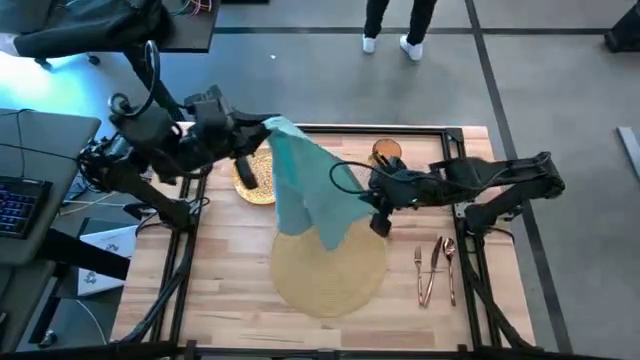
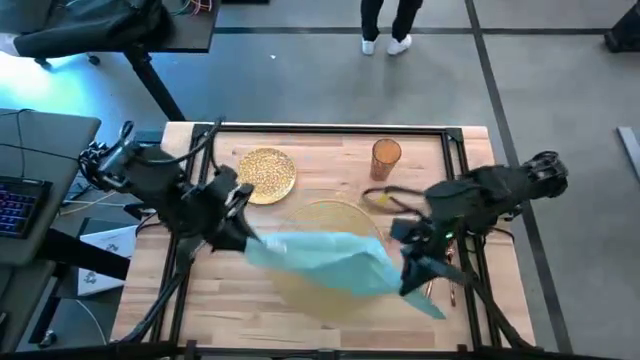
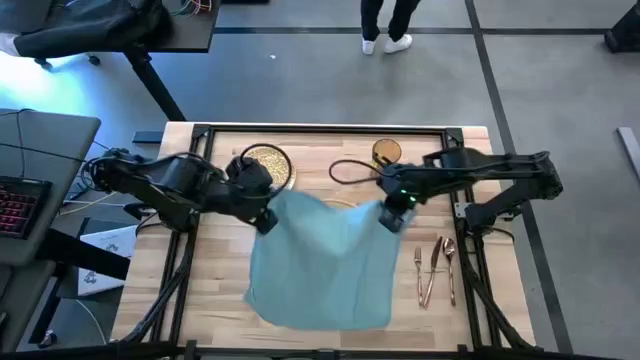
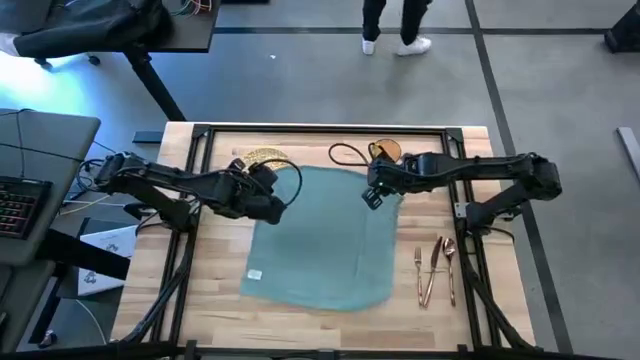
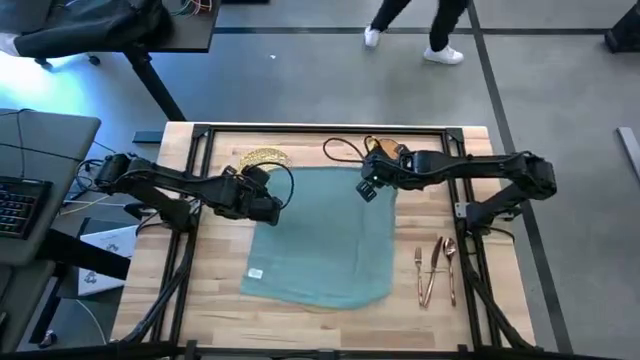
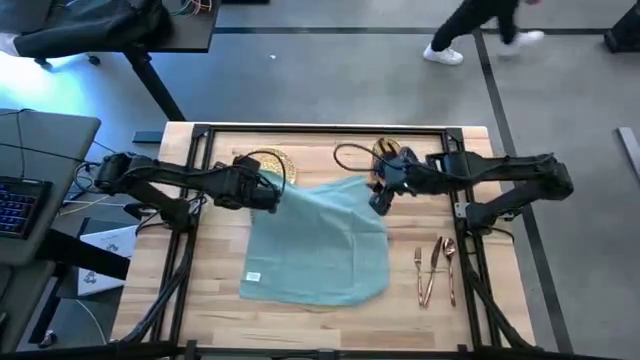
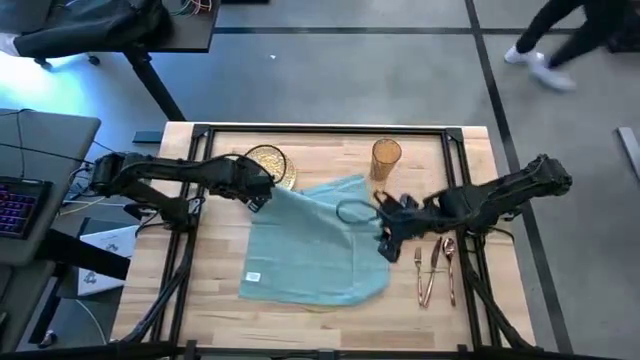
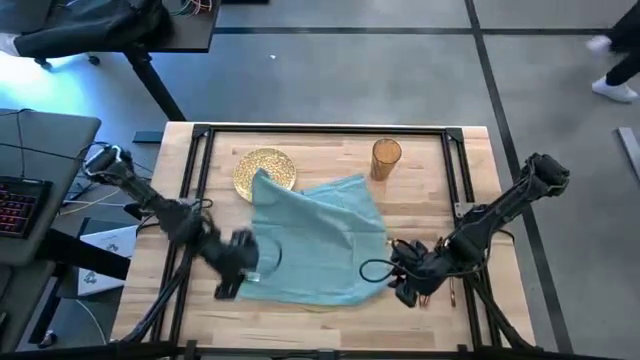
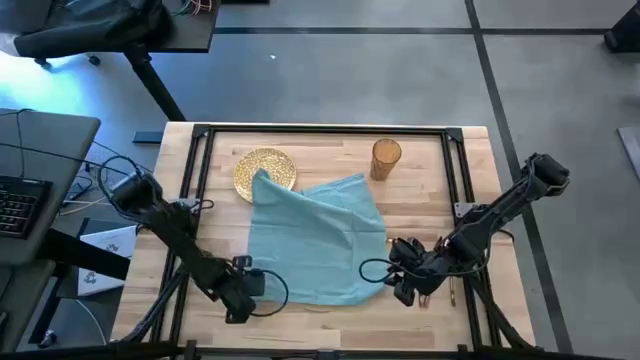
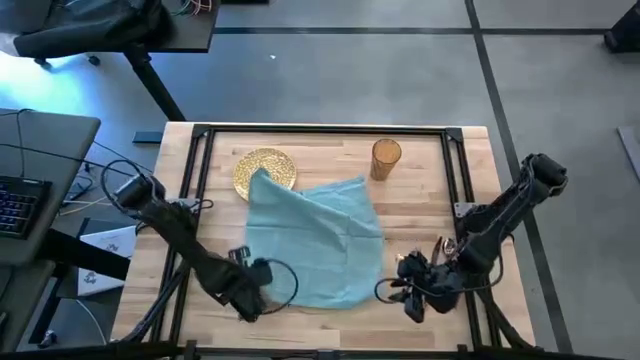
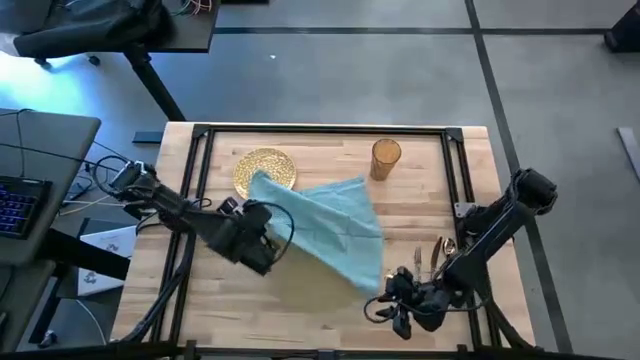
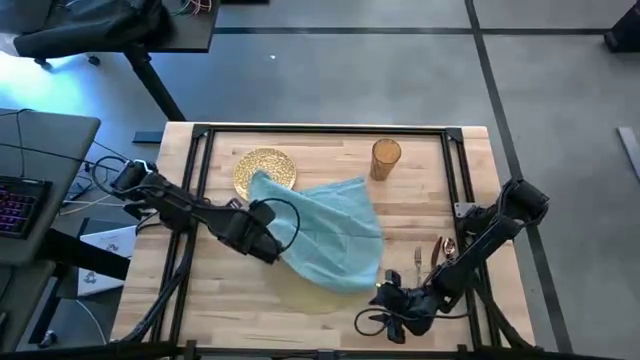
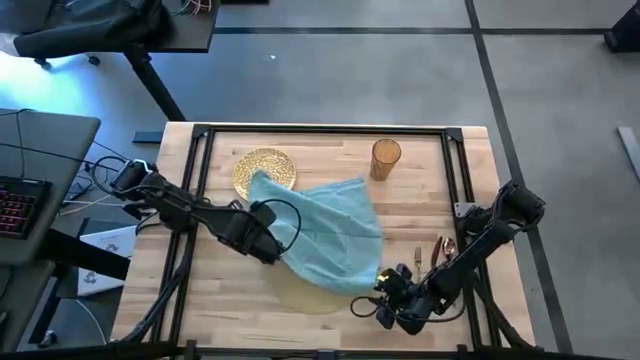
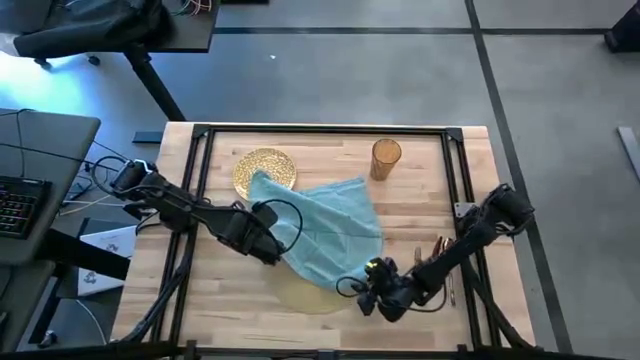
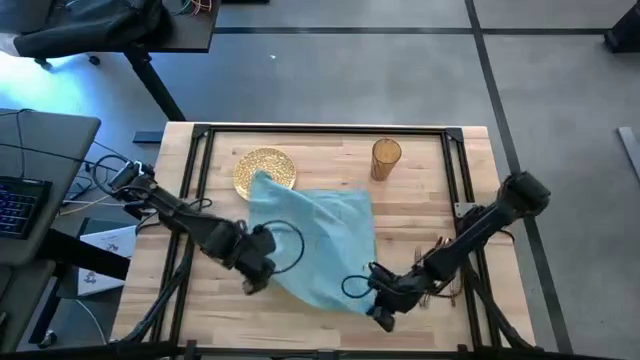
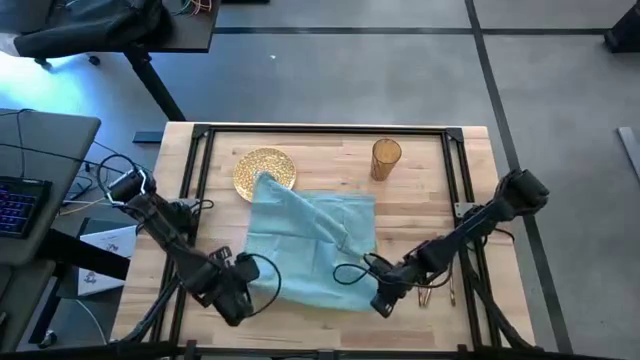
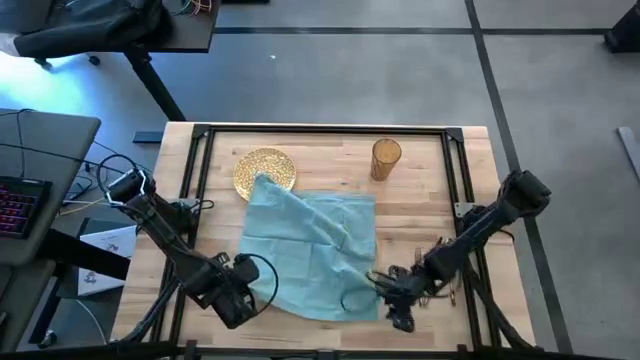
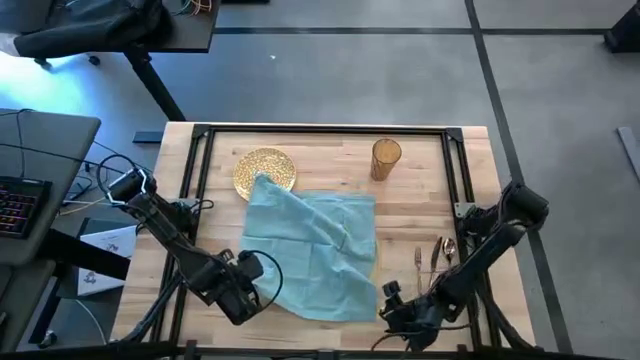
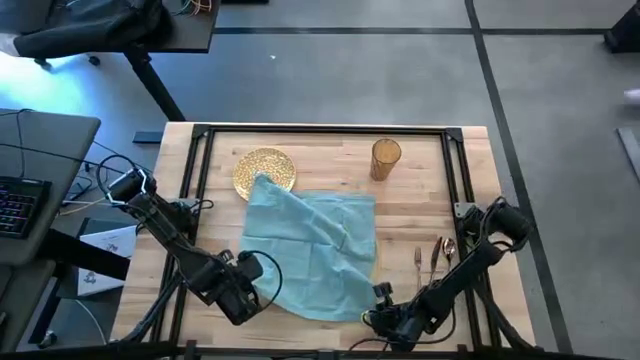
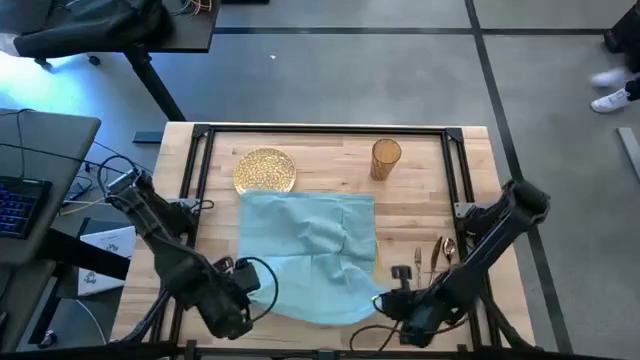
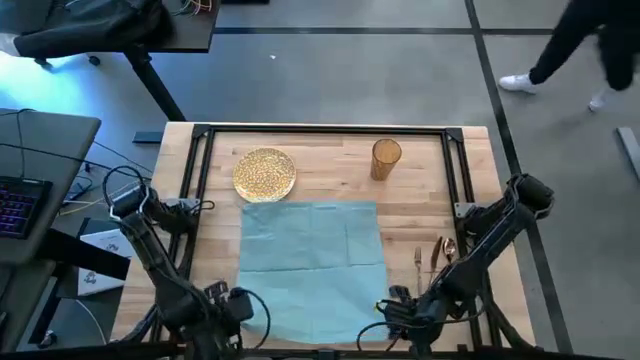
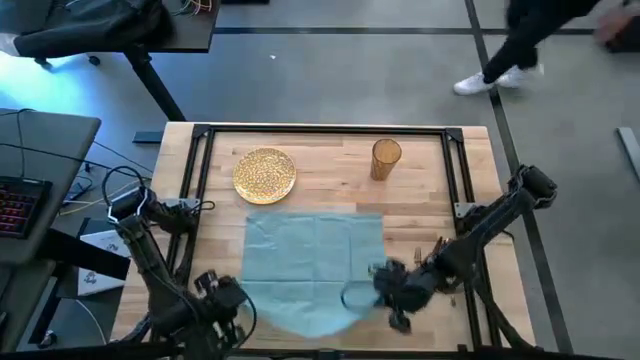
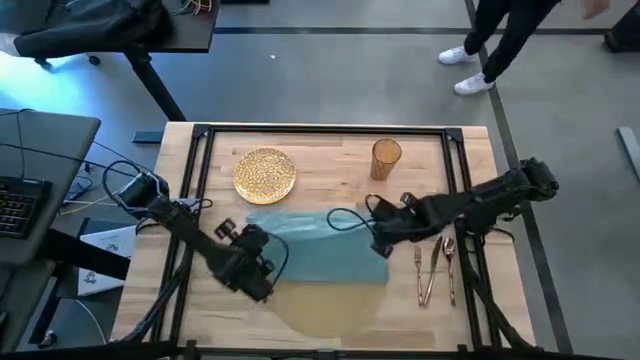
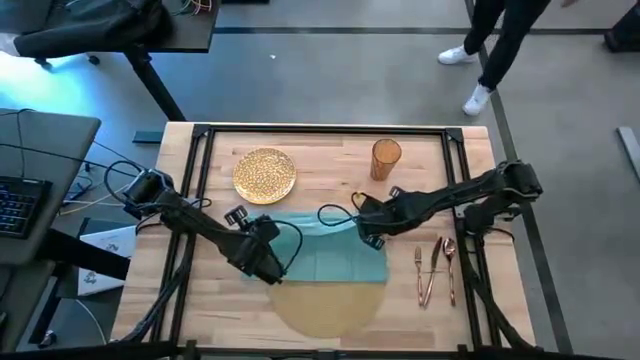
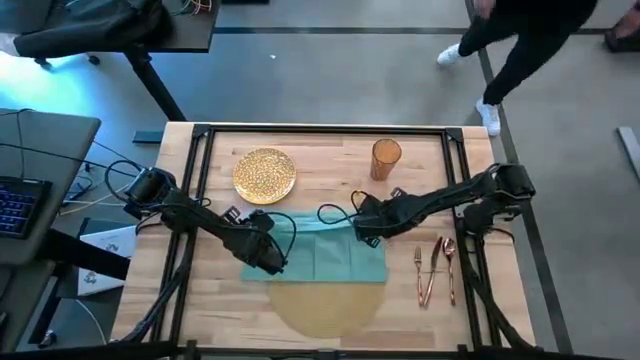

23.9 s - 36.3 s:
Task: Set table place
Fold the blue napkin

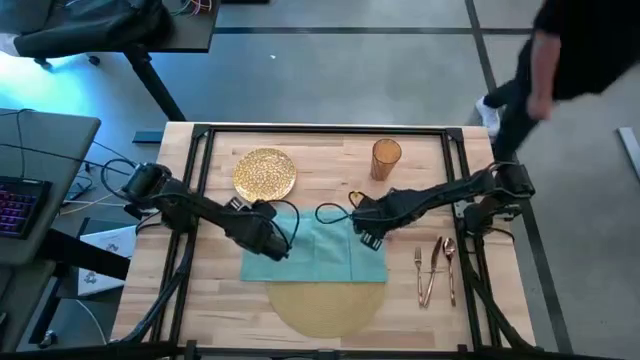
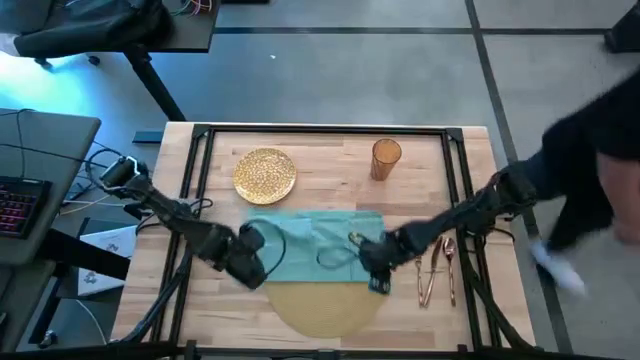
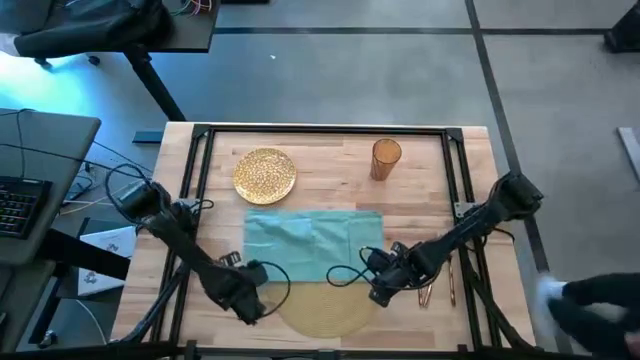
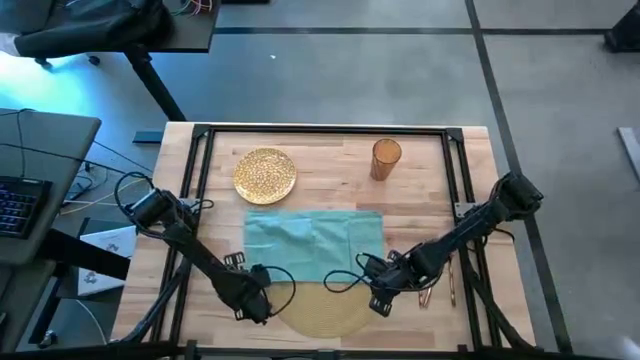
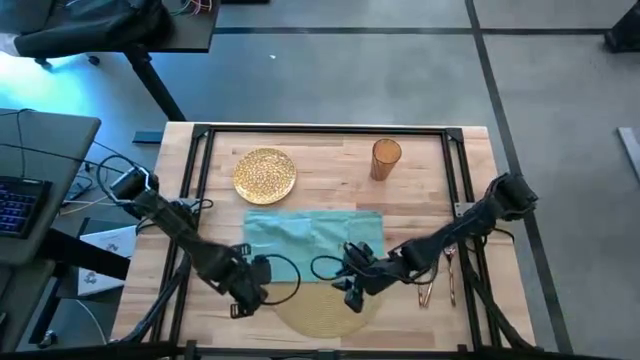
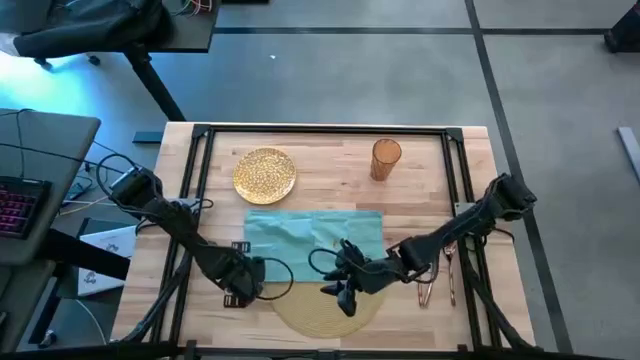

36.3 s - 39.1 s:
Fold the blue napkin

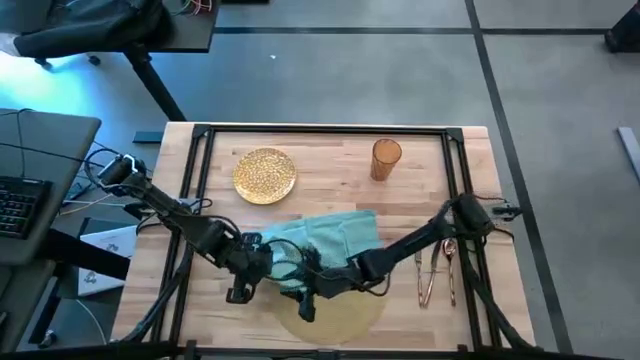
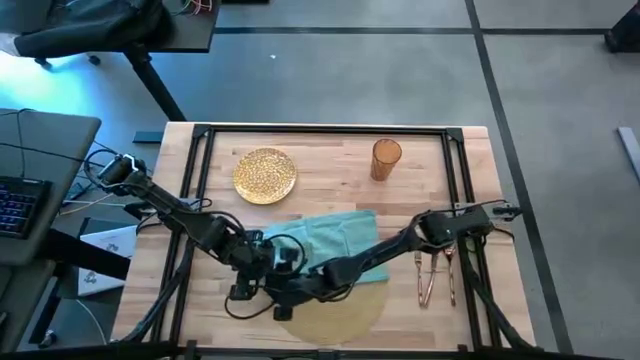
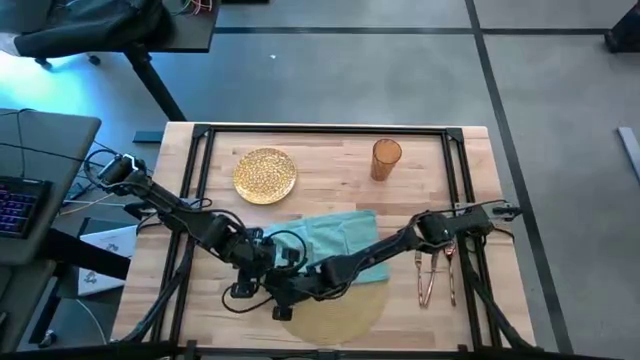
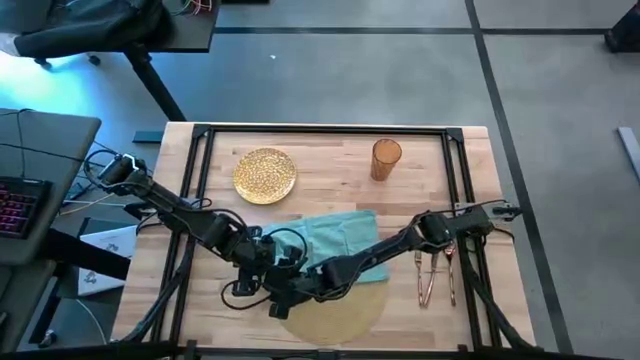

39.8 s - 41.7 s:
Fold the blue napkin

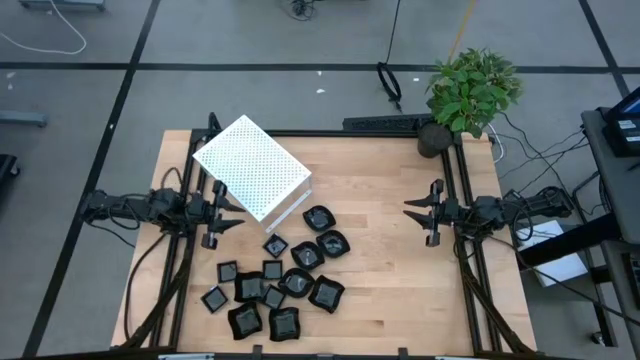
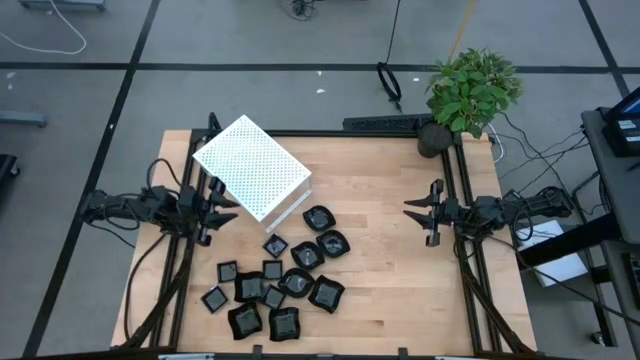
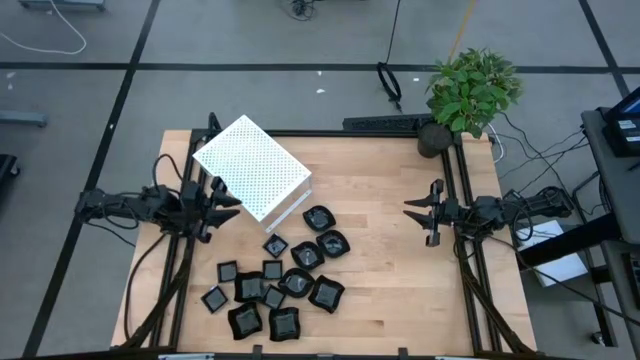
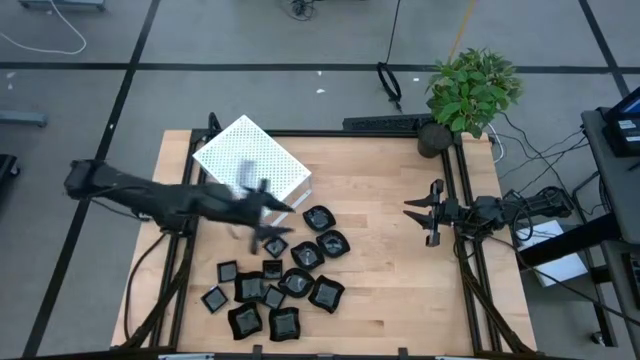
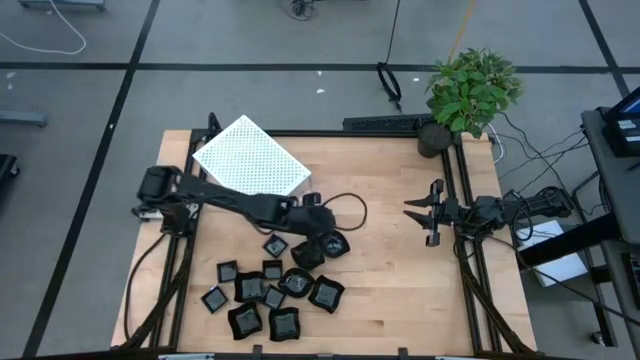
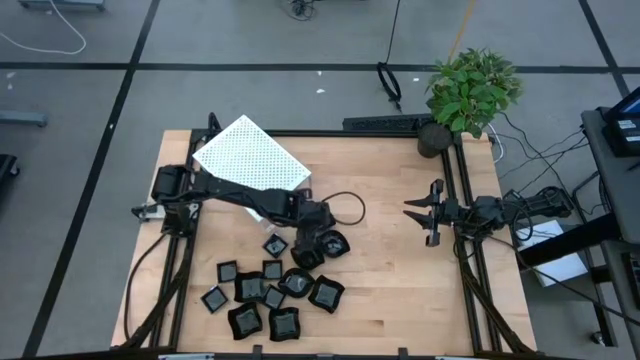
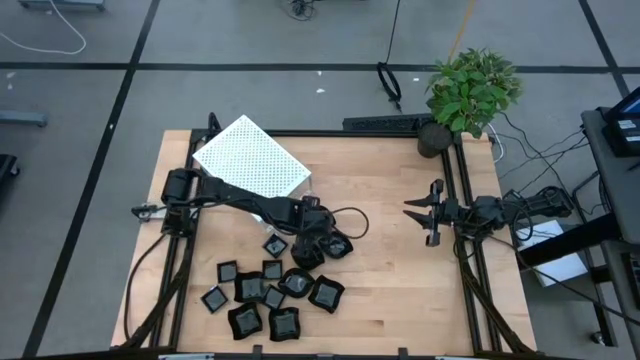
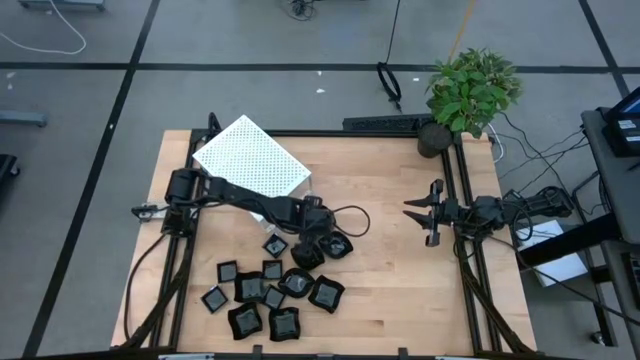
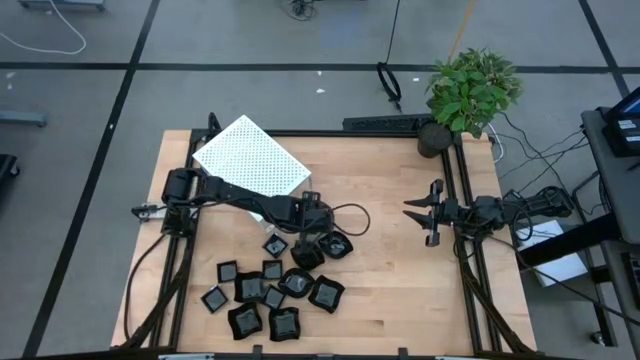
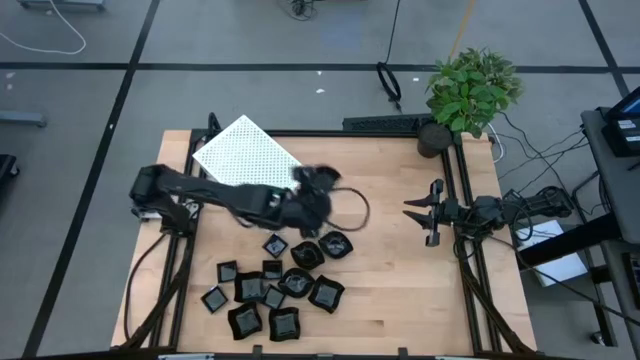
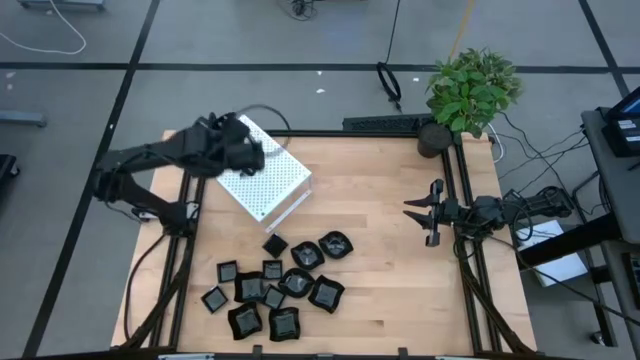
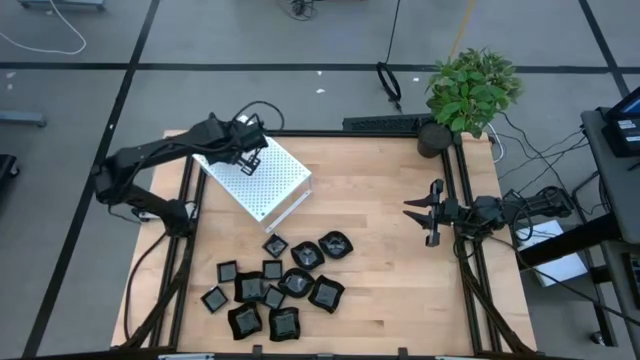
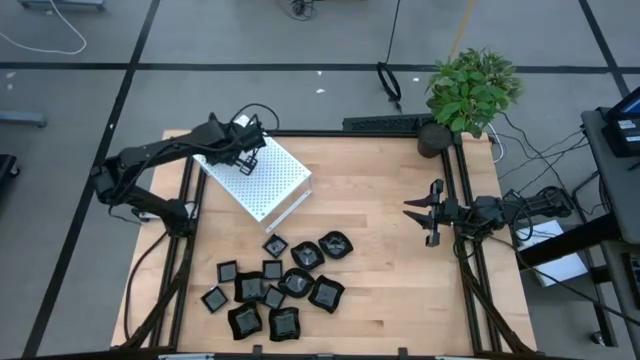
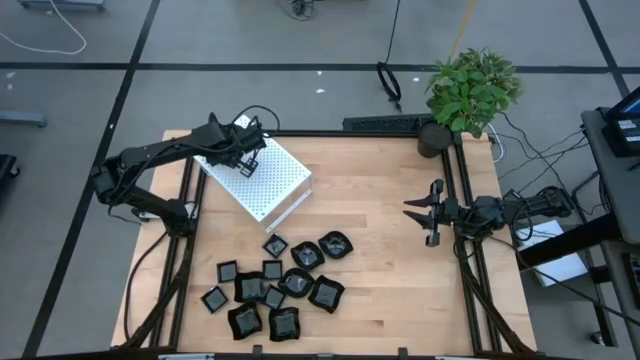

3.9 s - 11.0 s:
Task: Pick & Place Mini shaped plates
Put the black leaf-shaped plate on the shelf
